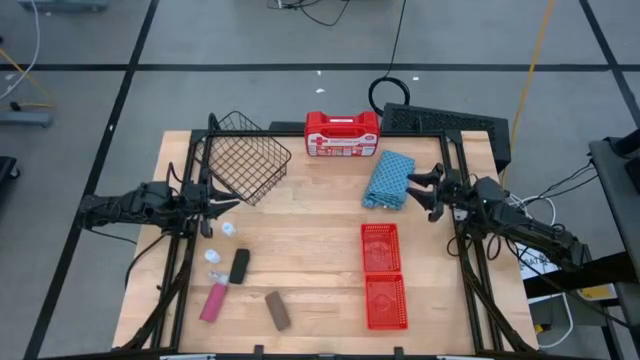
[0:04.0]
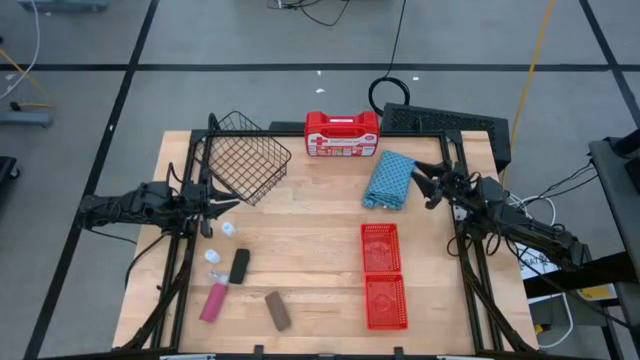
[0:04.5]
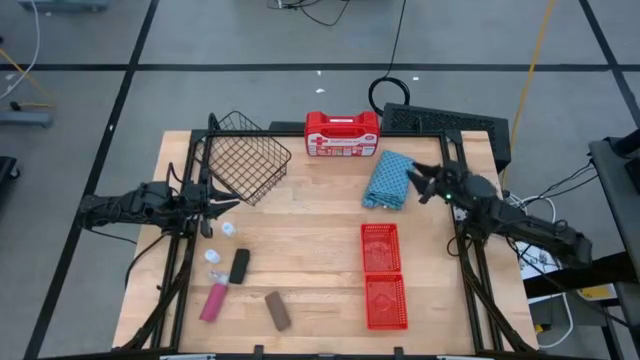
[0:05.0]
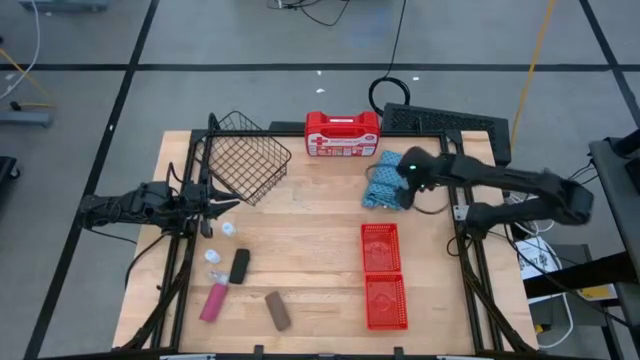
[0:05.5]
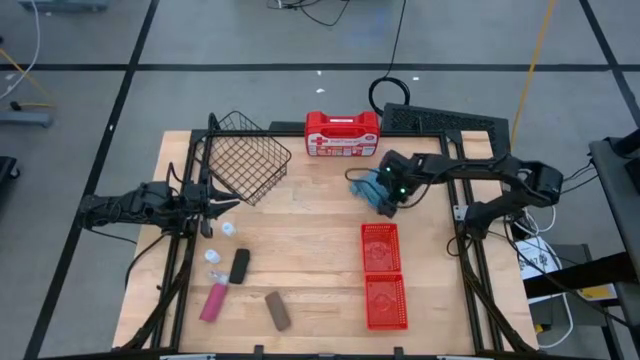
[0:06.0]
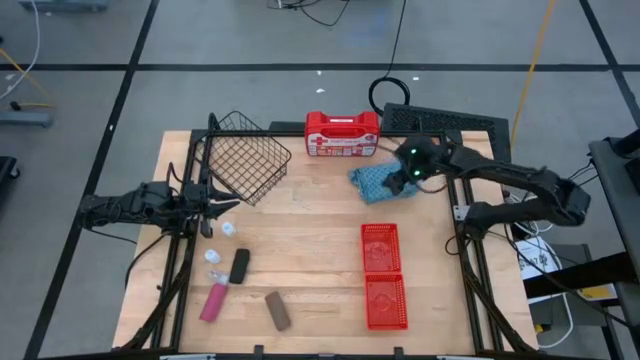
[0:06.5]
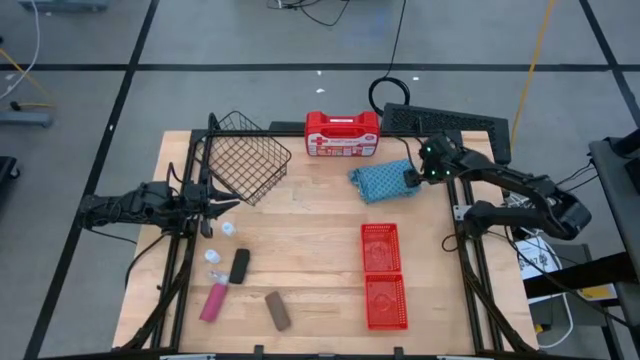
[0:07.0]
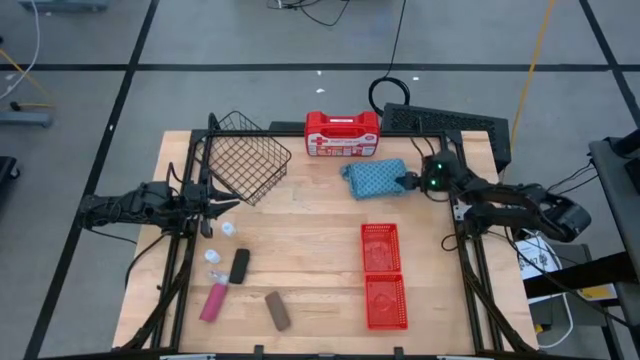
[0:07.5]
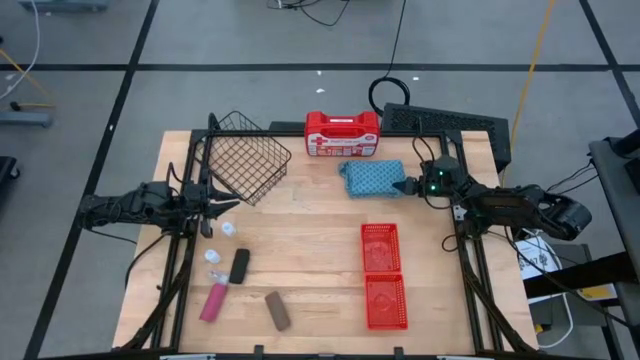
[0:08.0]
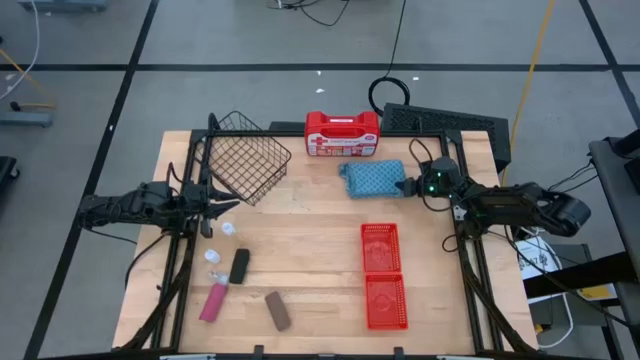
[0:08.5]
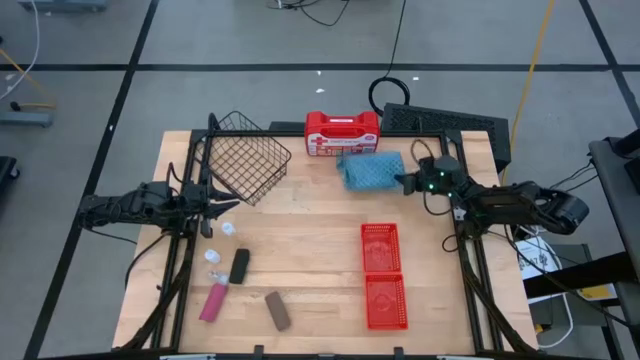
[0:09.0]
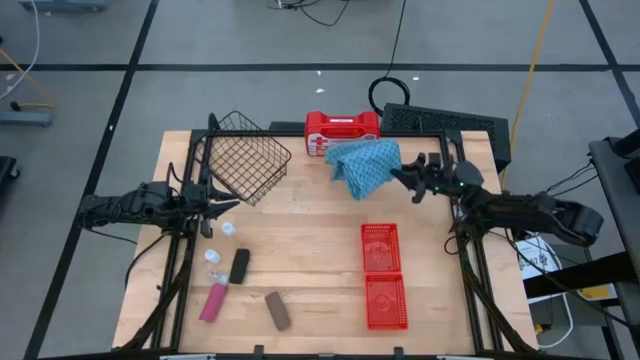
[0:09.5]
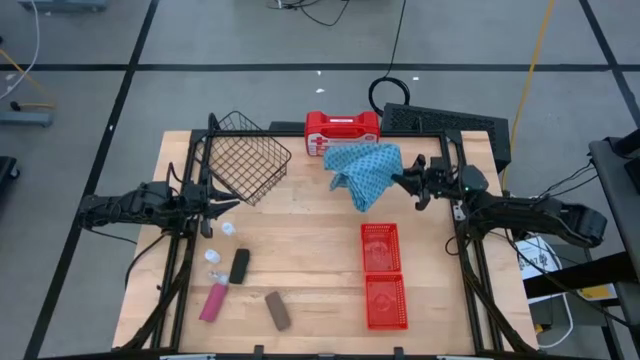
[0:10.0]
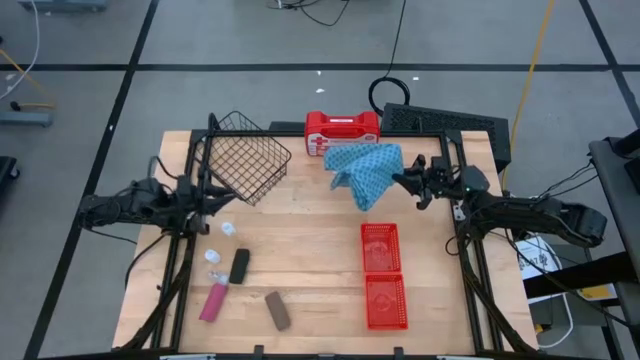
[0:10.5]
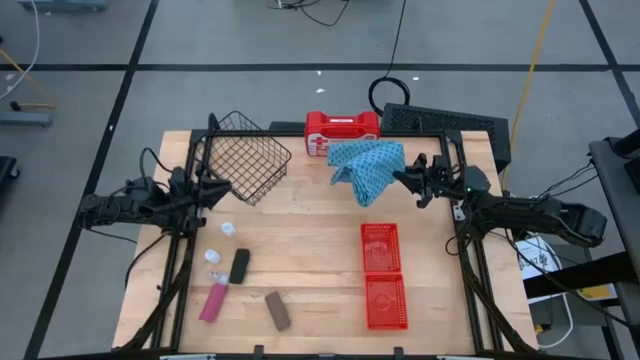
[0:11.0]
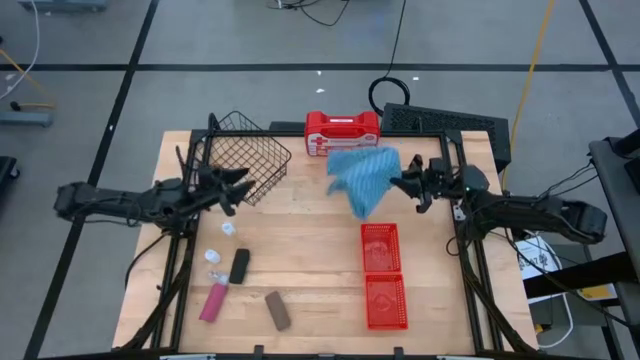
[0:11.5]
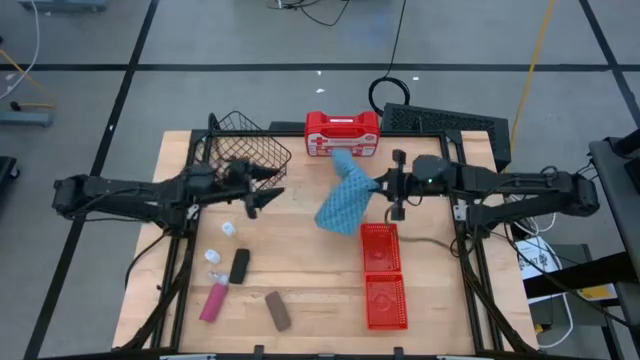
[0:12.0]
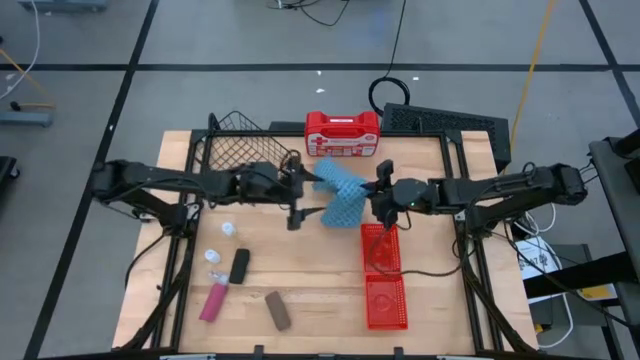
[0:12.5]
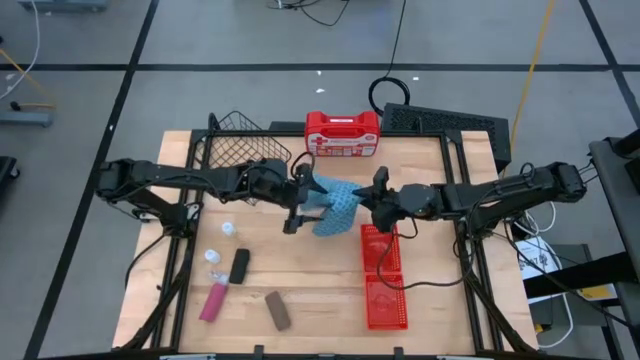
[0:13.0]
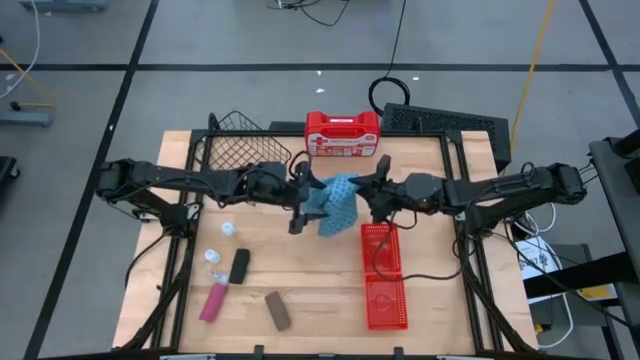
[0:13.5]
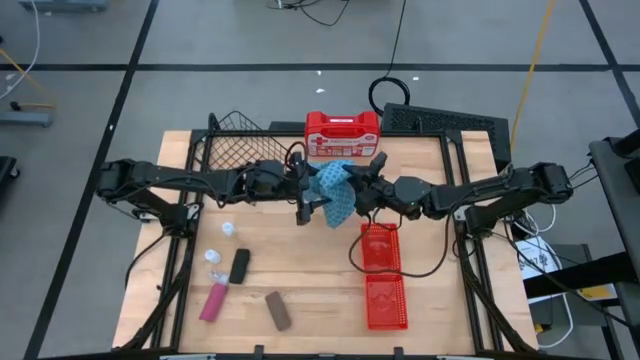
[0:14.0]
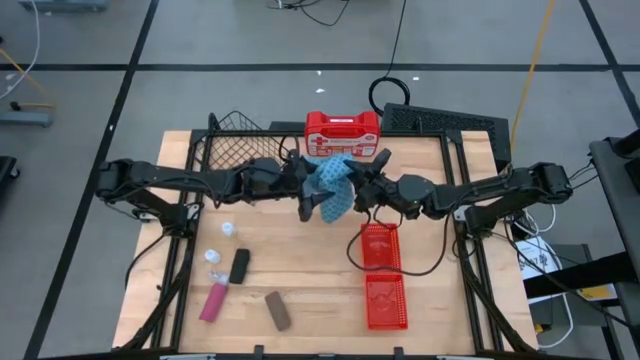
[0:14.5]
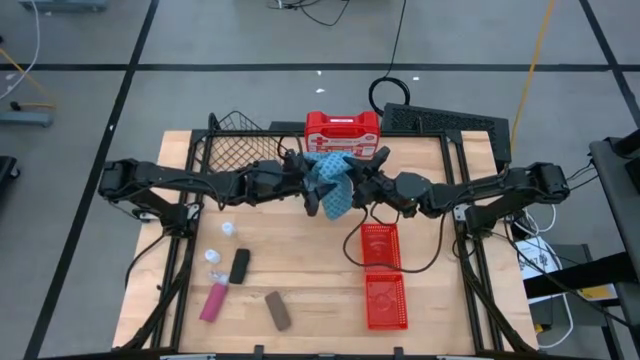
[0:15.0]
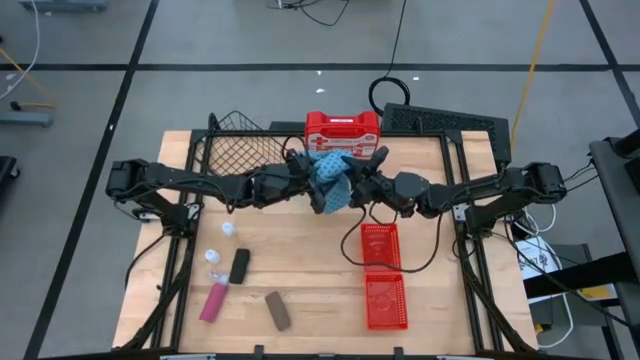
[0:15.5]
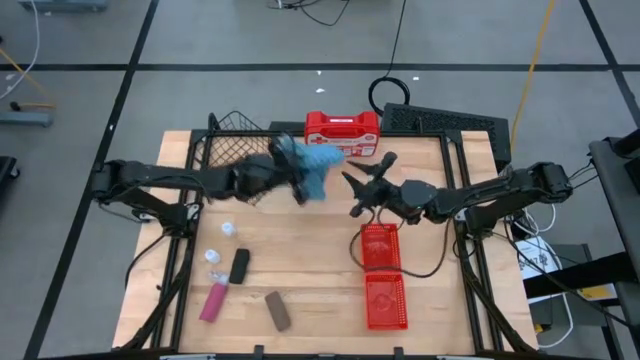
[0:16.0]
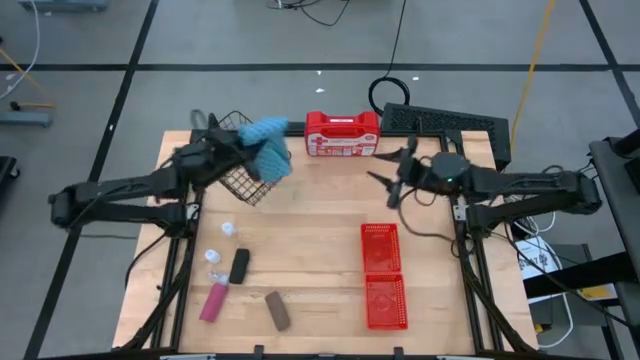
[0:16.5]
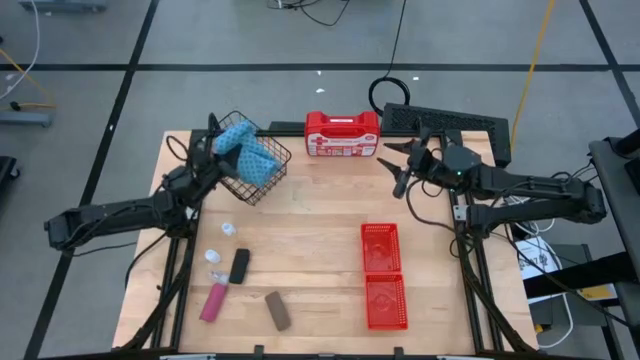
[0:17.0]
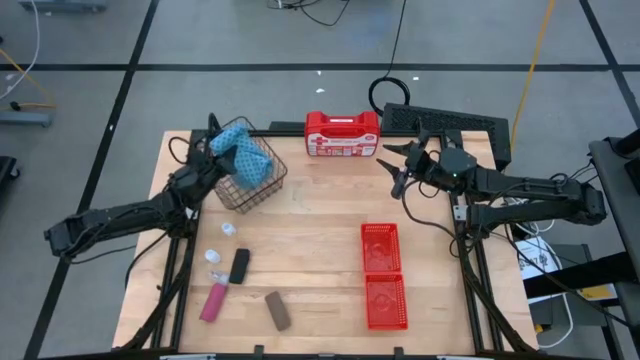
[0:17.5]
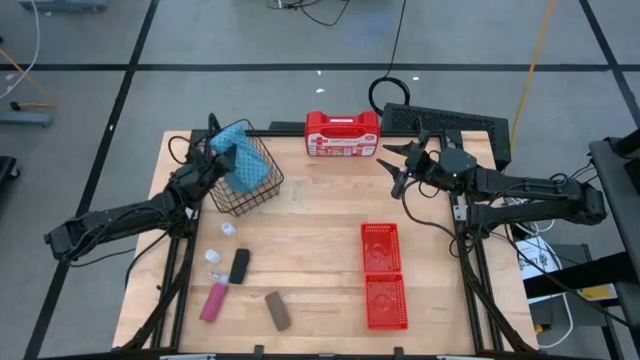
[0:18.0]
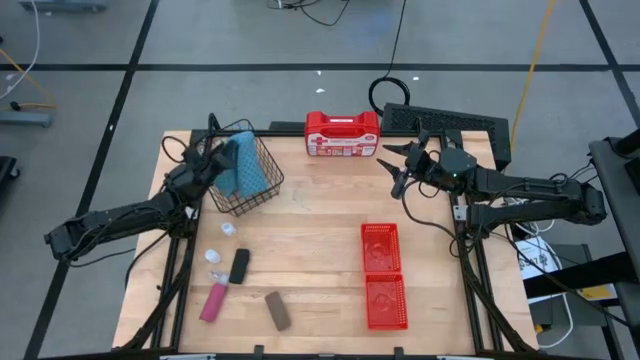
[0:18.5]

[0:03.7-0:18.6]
Task: Pick & Place Medicine items
Put the blue patient gown into the black wire basket

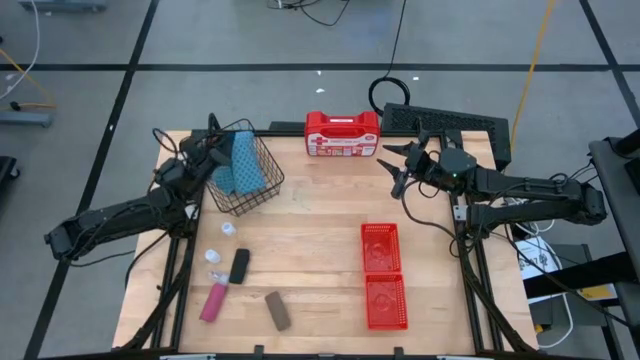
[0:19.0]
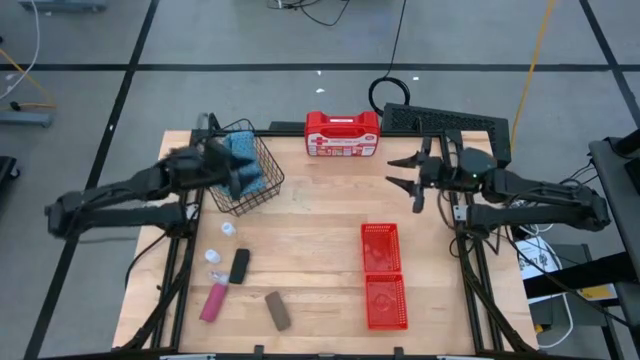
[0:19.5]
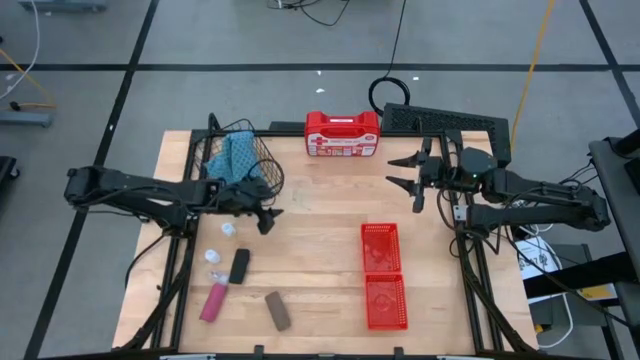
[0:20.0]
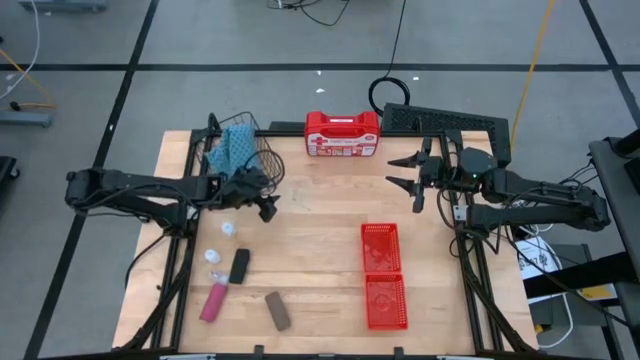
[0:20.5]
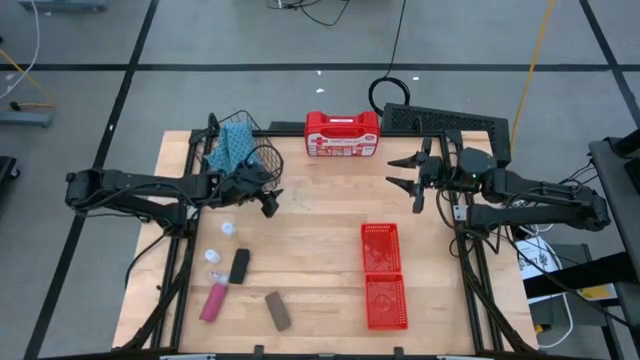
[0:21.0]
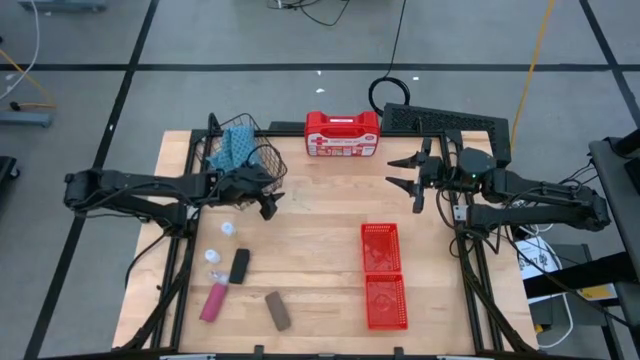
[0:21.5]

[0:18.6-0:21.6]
Adjust the black wire basket on the table

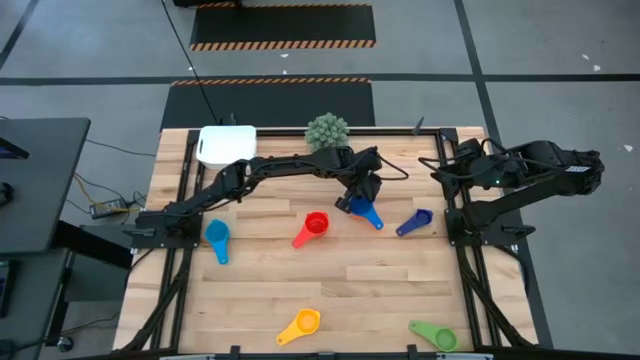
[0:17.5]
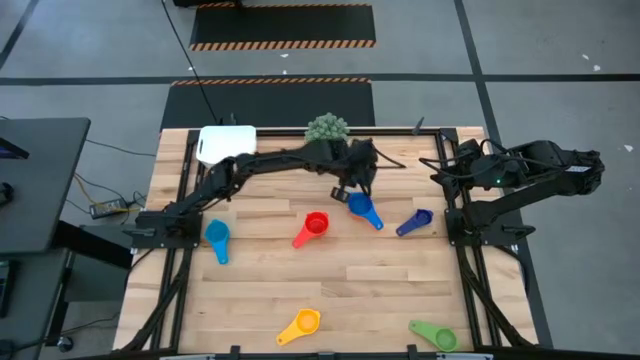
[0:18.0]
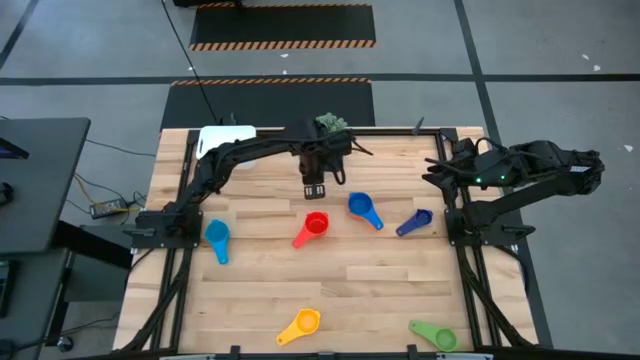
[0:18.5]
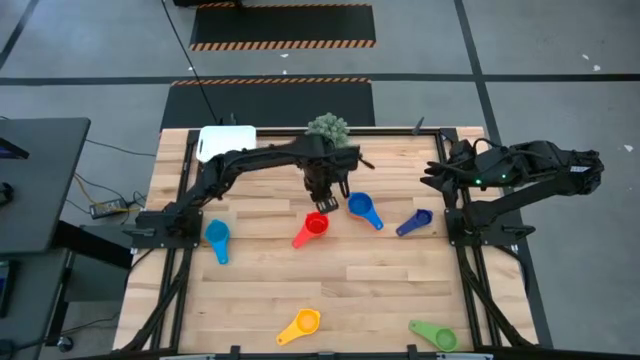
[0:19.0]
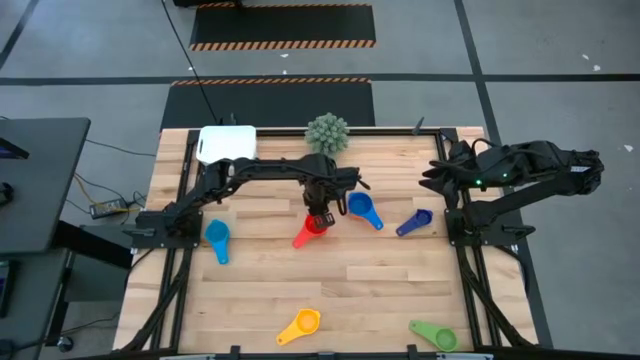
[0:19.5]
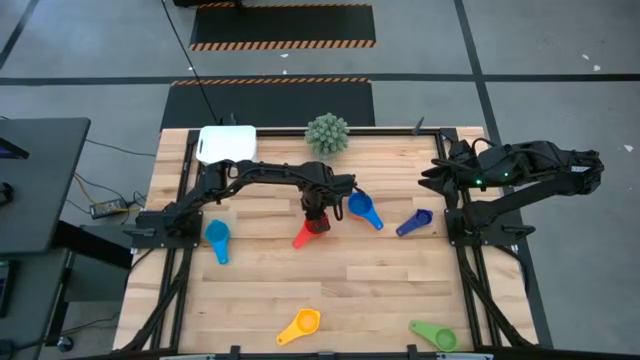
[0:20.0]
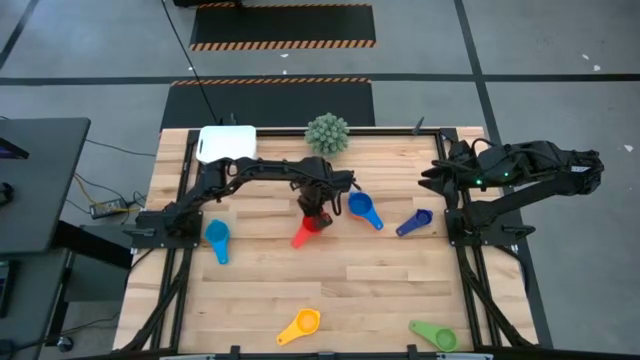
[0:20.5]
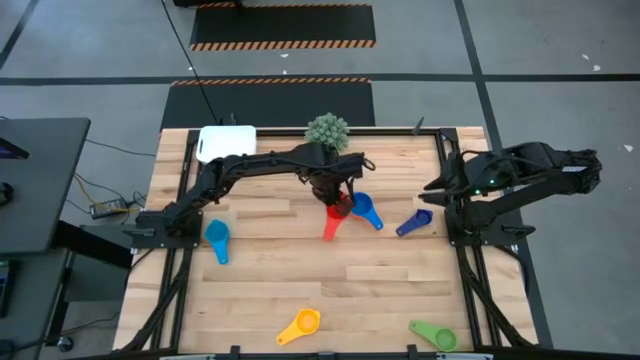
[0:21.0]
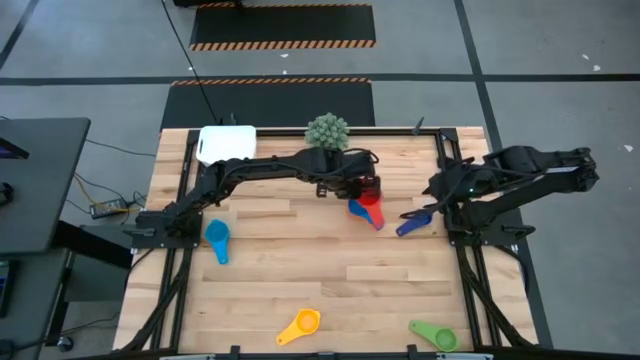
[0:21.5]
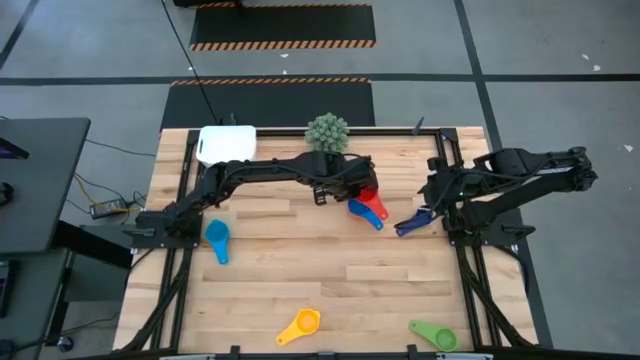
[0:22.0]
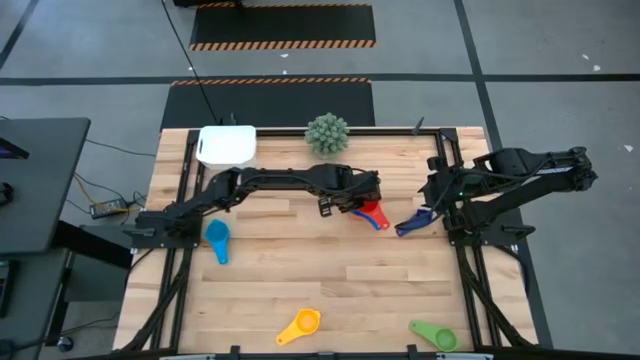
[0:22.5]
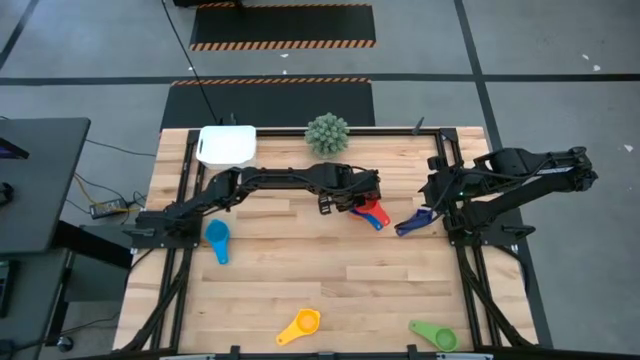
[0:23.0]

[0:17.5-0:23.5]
Task: Nest measuring cups in basket
Stack the red measuring cup on top of the blue measuring cup
